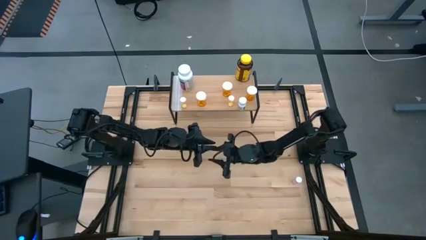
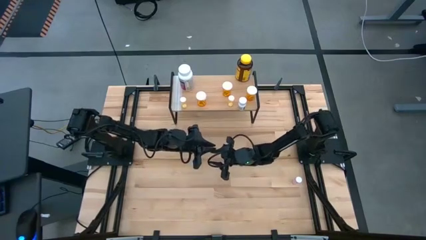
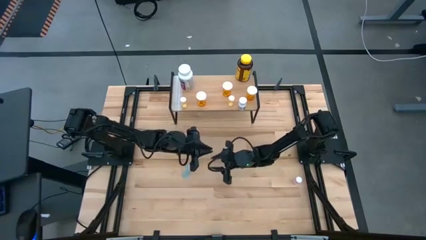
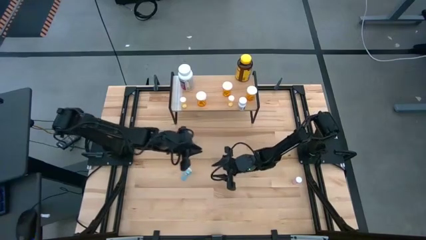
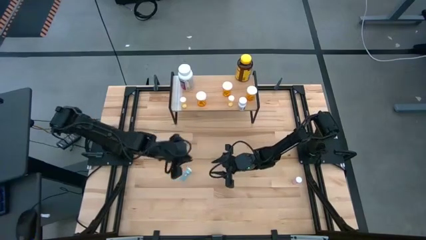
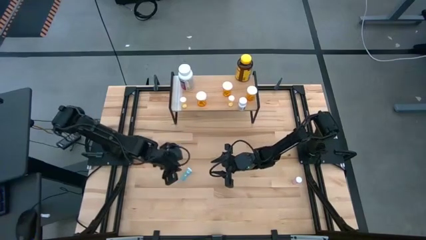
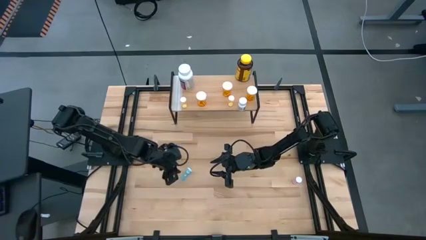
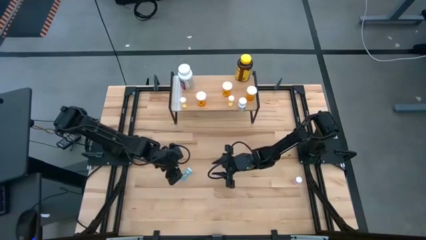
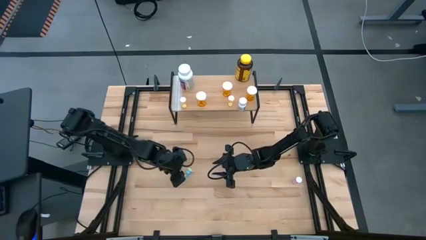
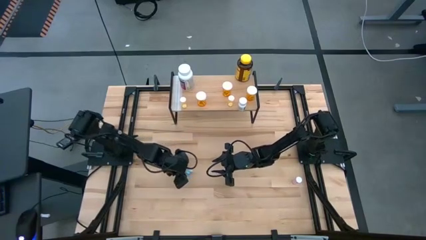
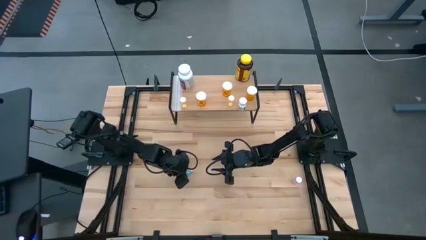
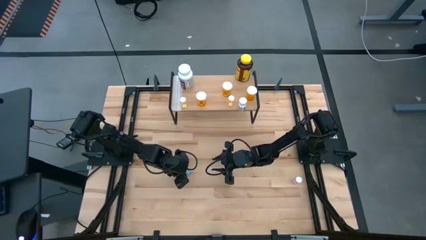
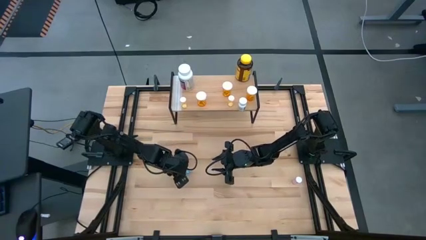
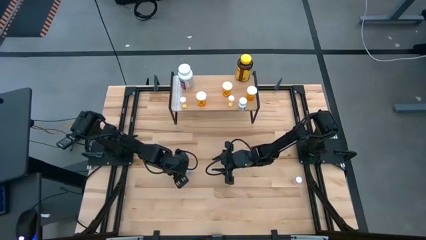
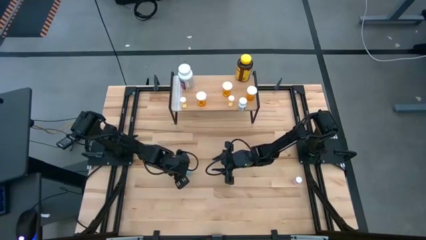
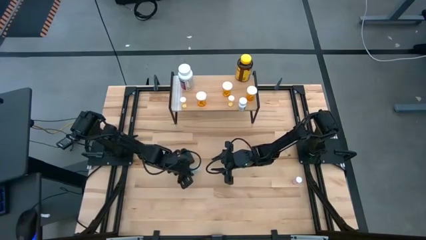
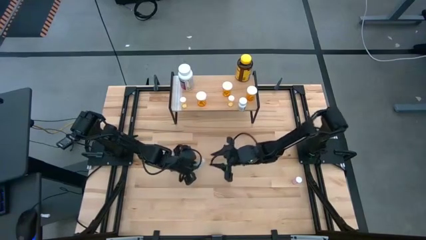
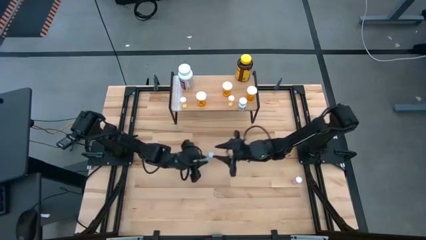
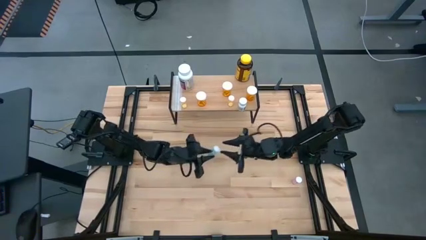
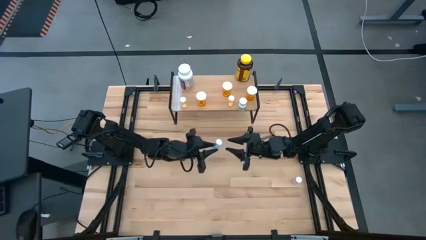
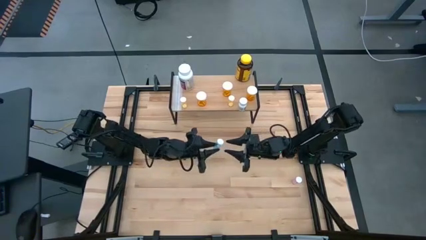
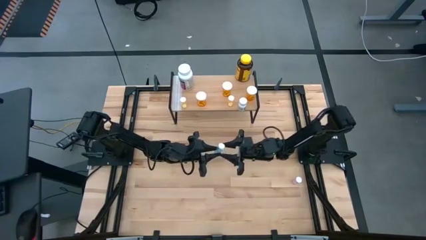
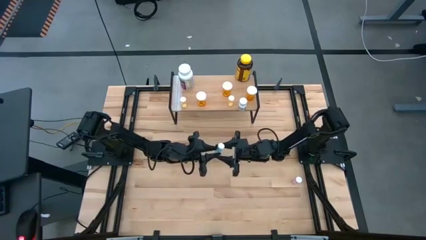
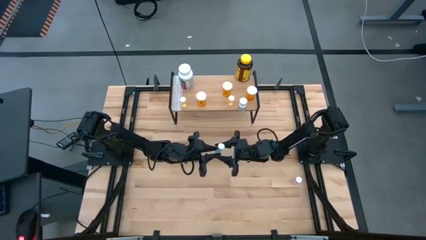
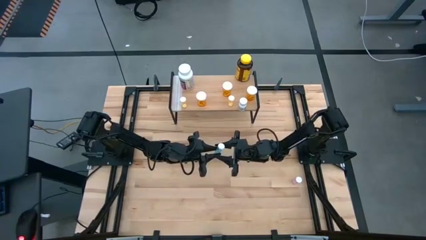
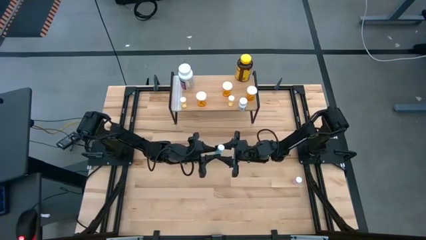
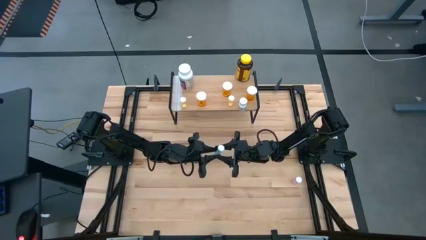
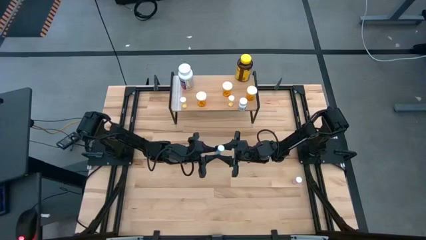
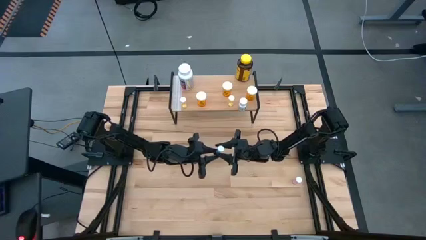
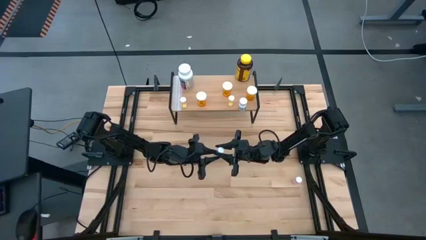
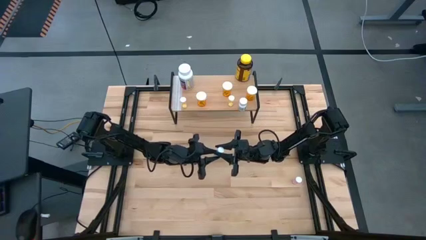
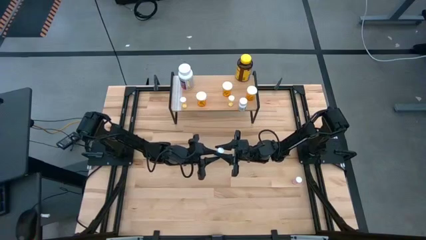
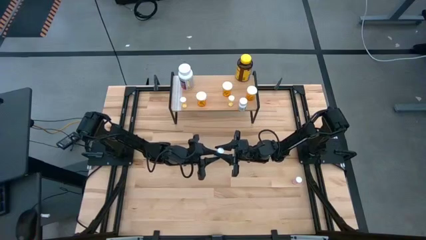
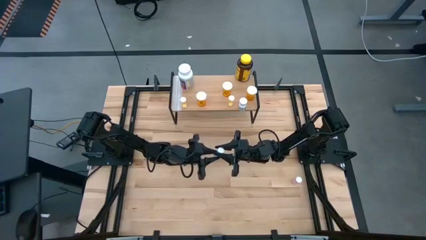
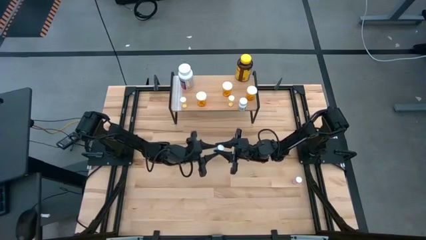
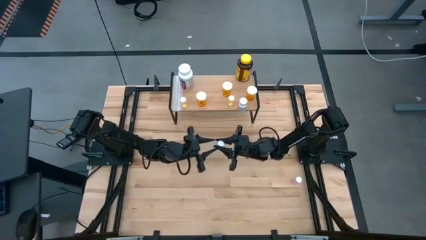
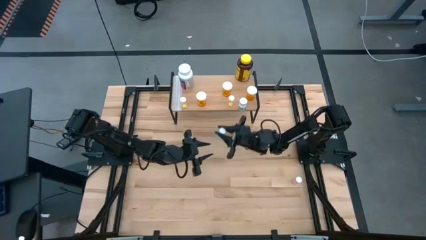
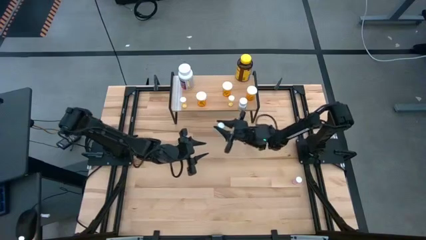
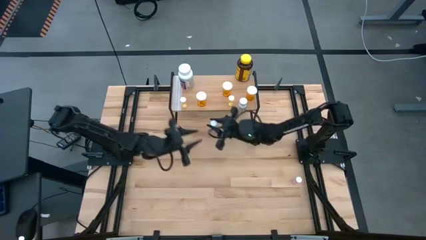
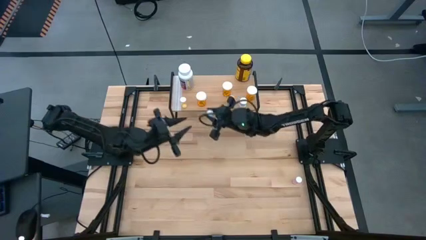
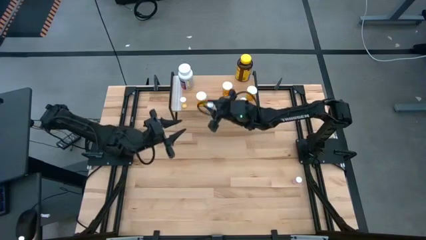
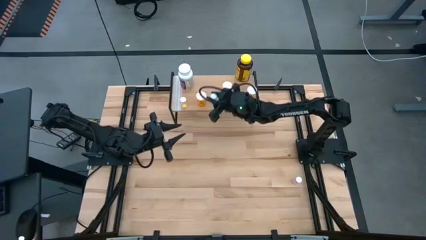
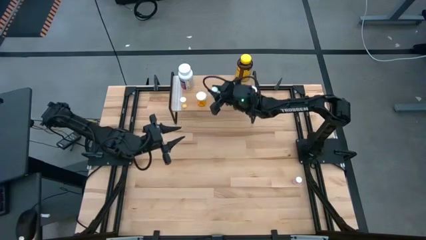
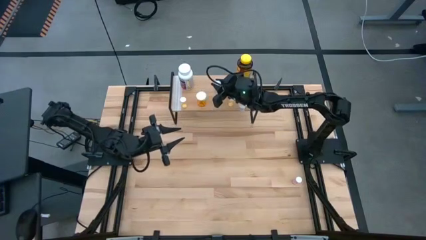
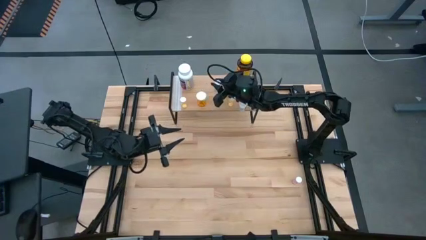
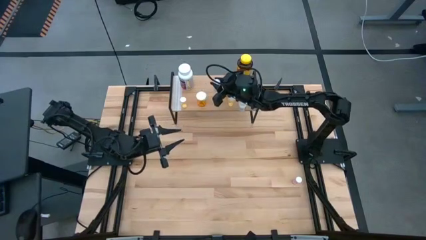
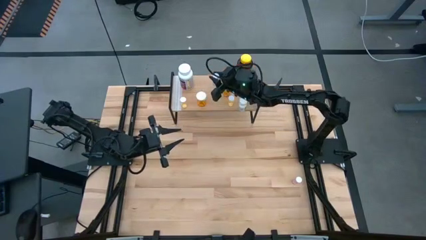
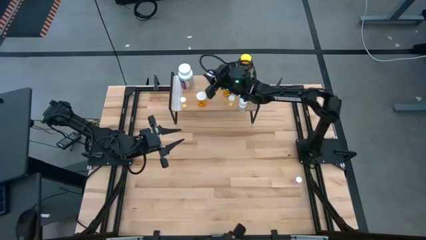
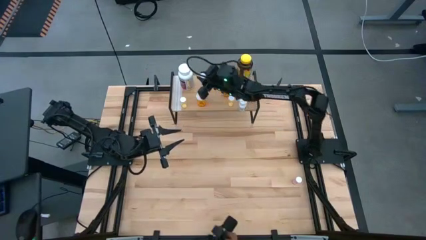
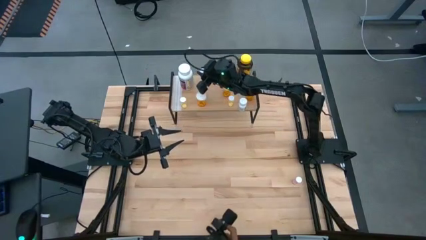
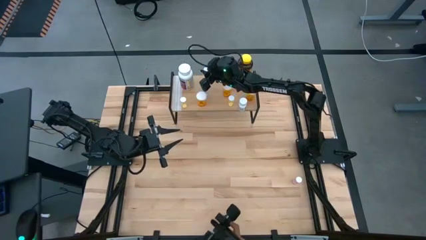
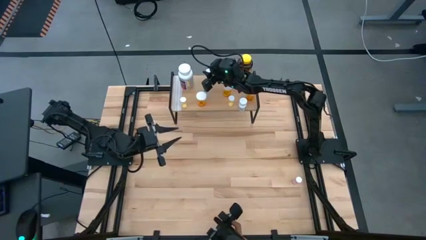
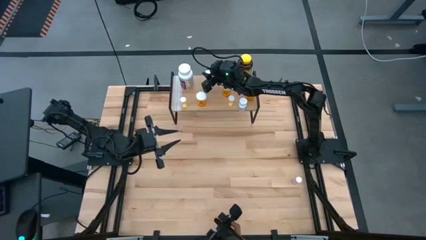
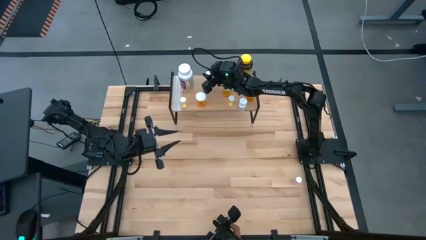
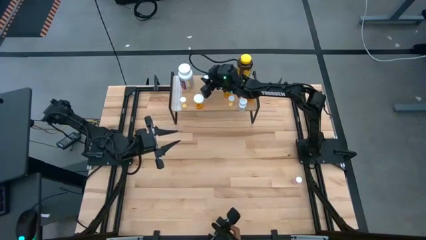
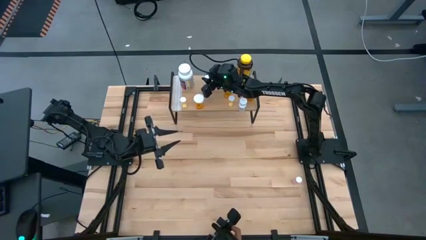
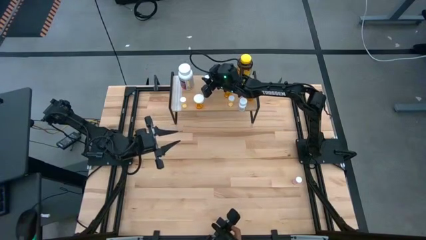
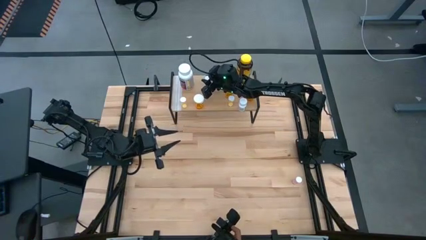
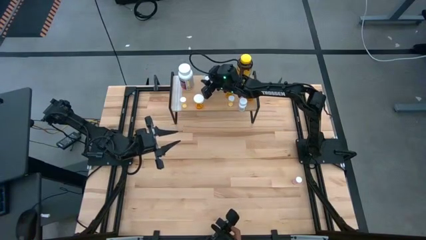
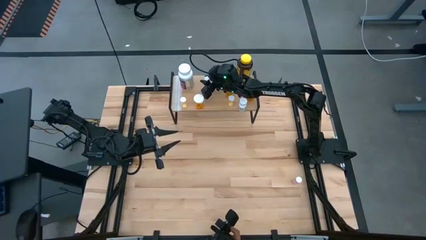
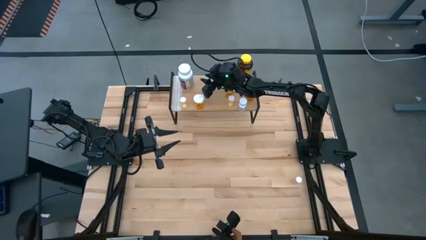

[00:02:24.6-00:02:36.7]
Task: Pick and place medicine bottles onto shelf by color
Put the small blue medicine bottle on the shelf

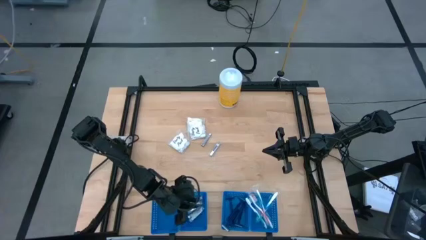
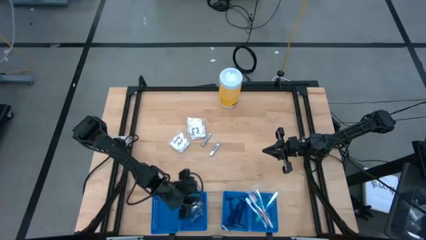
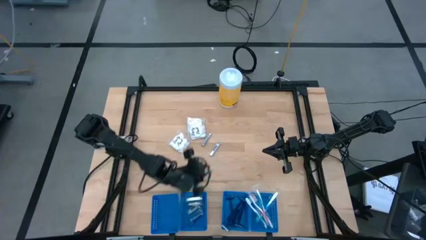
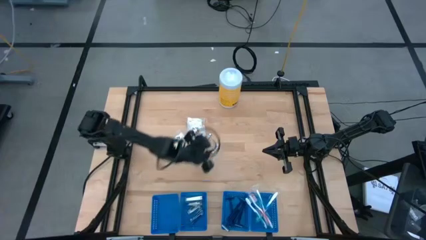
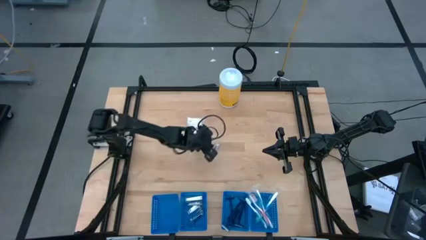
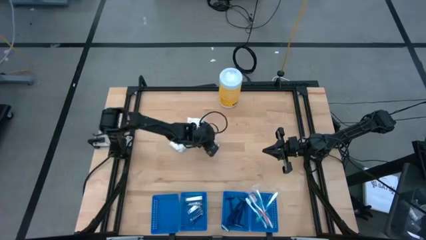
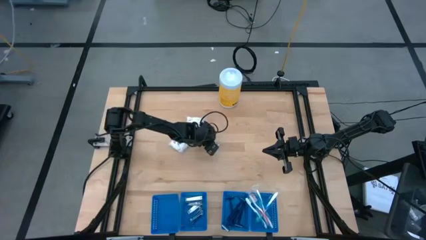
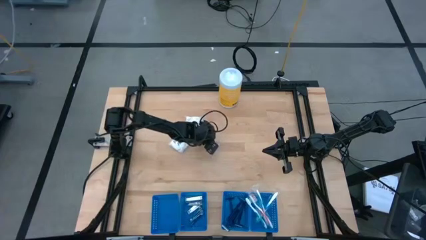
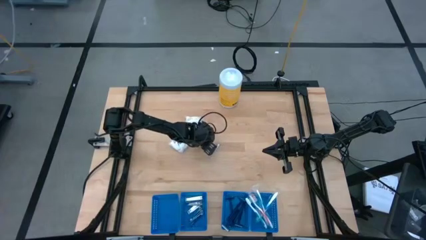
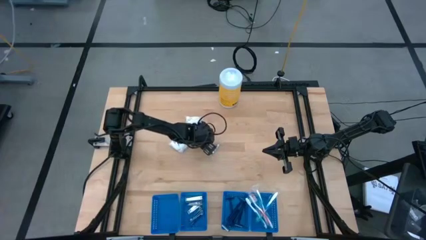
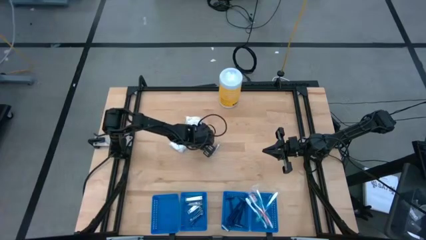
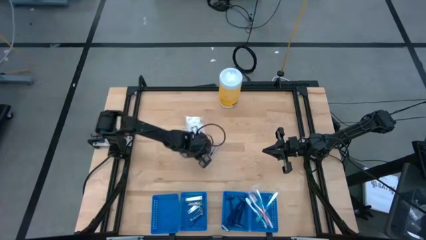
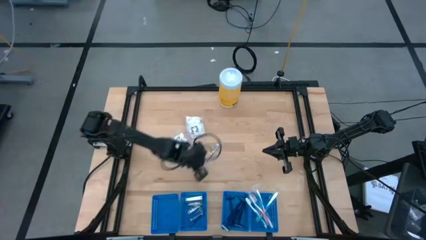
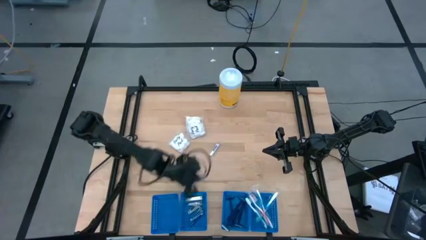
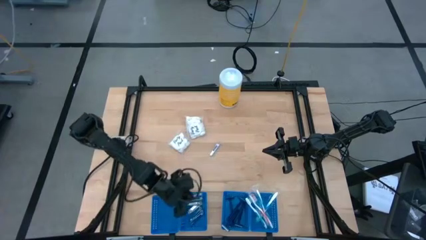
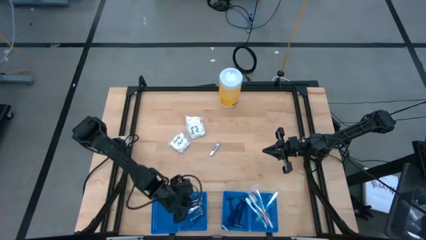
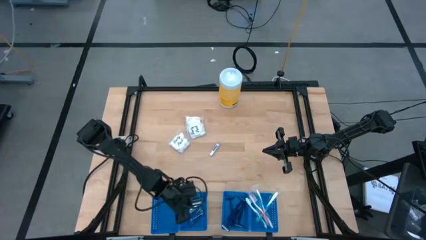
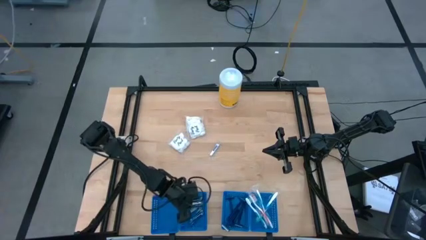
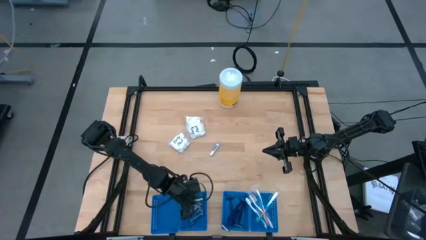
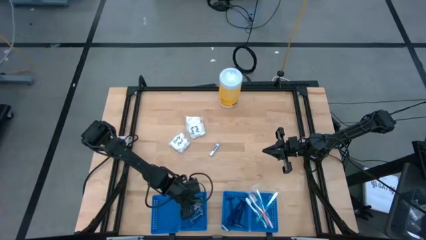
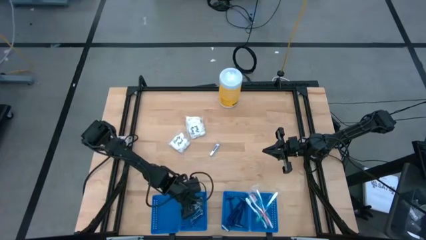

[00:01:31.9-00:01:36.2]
Task: Pick & Place Travel size toiletries
Put the silver nail cutter into the blue basket
